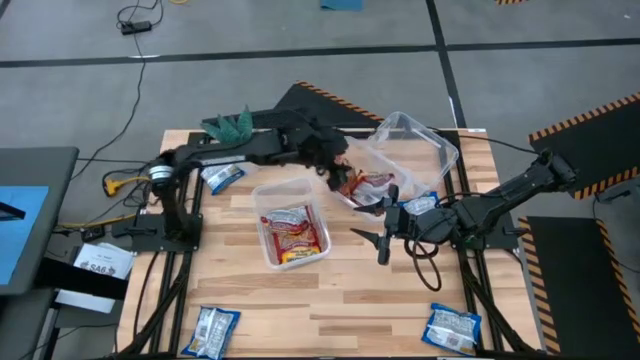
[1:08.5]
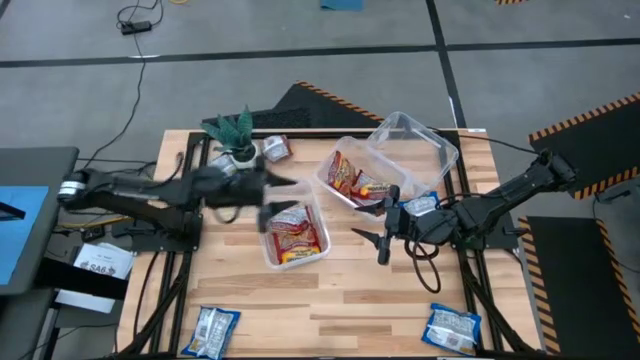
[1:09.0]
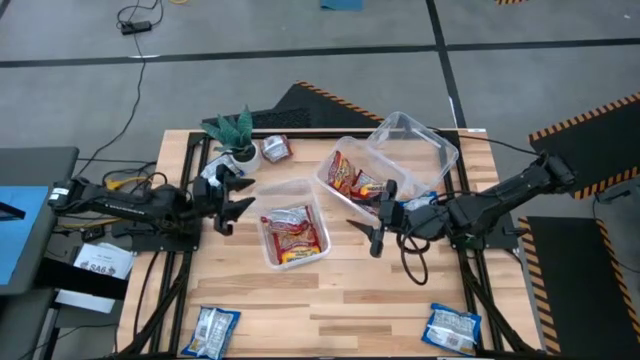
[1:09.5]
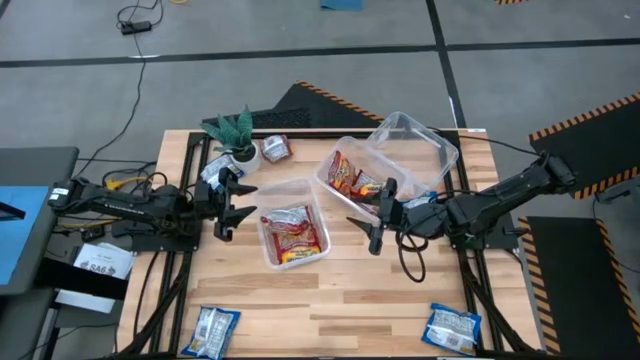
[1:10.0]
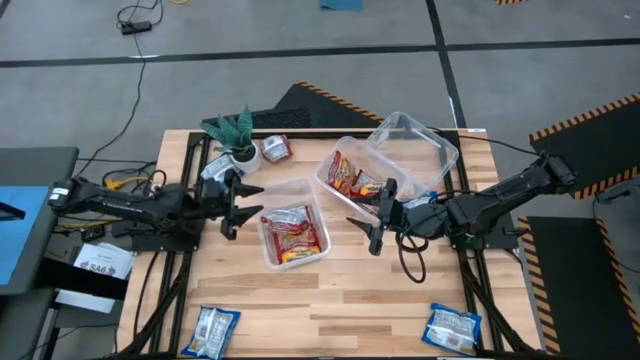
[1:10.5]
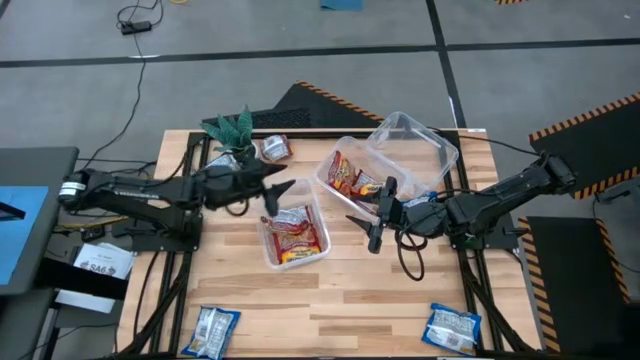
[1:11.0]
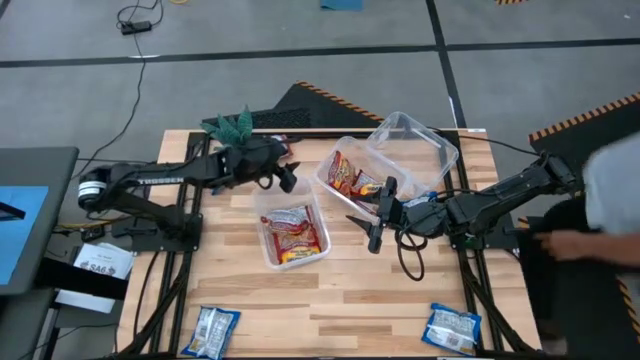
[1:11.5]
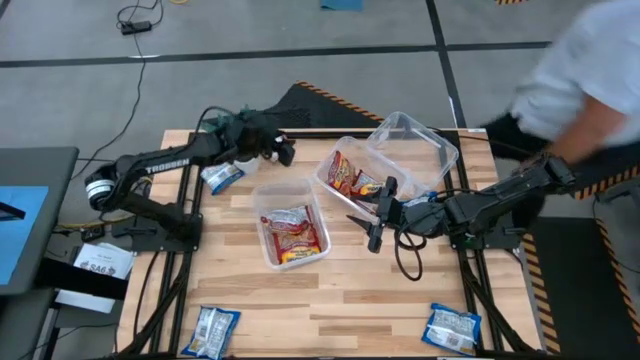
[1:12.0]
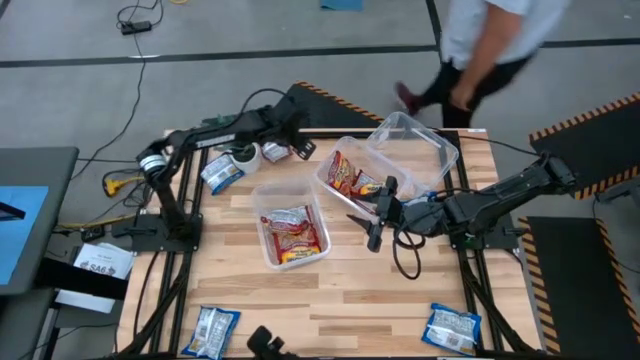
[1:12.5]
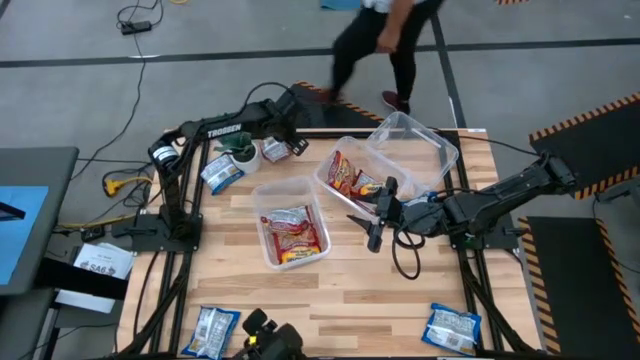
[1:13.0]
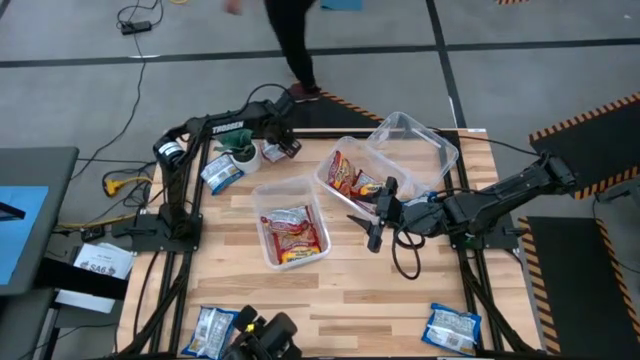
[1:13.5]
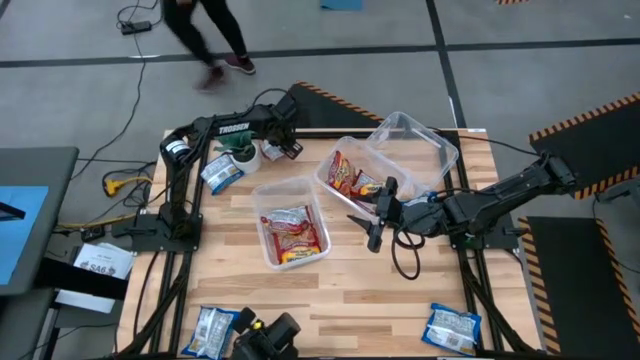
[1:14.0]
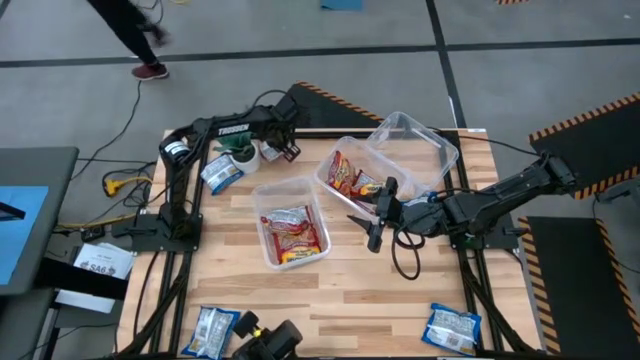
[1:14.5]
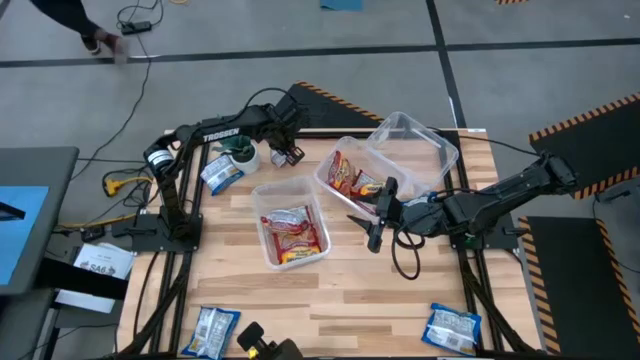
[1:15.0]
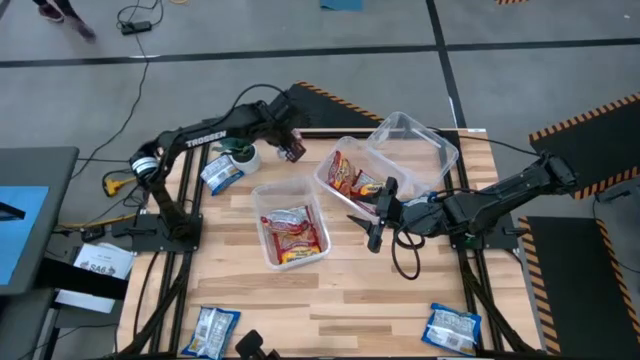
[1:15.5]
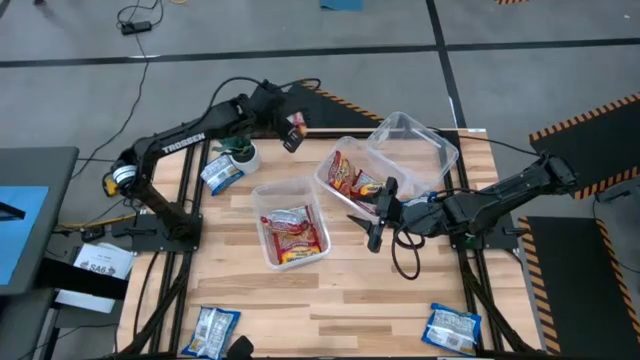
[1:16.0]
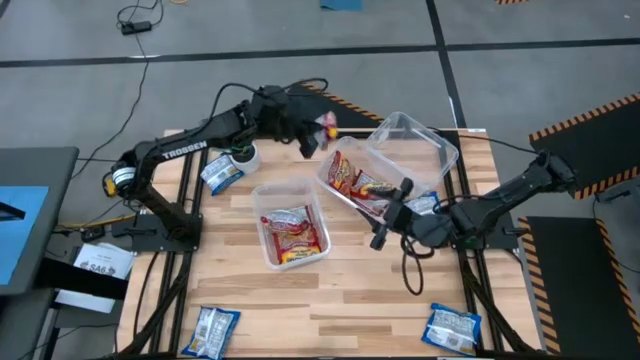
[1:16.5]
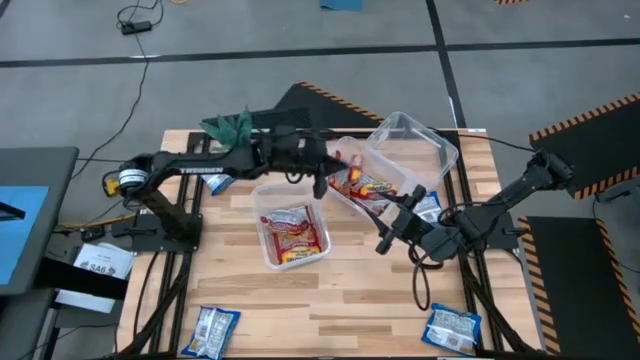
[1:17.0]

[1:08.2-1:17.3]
Task: Sort Maruchan noodles
Put the red noodle pack into the middle bin

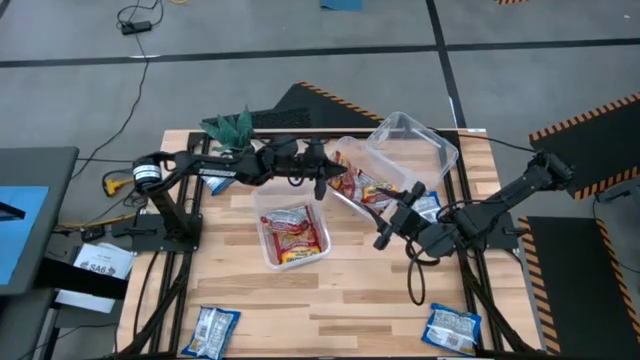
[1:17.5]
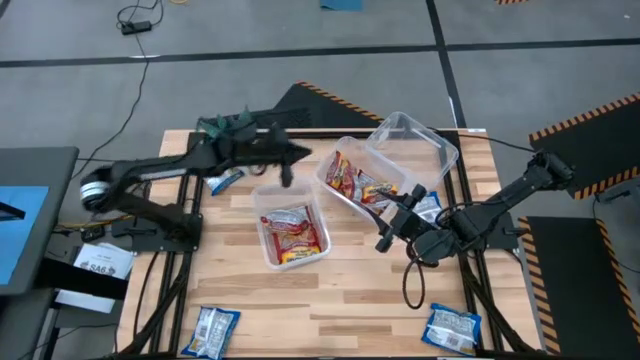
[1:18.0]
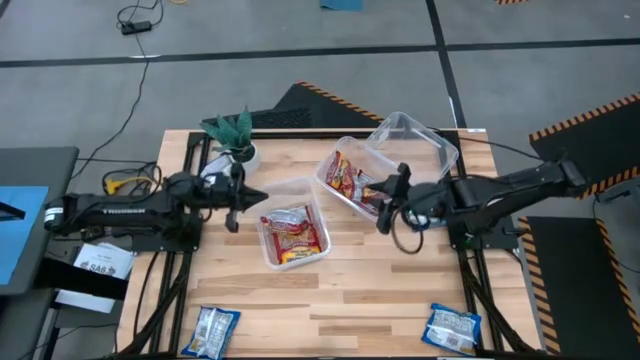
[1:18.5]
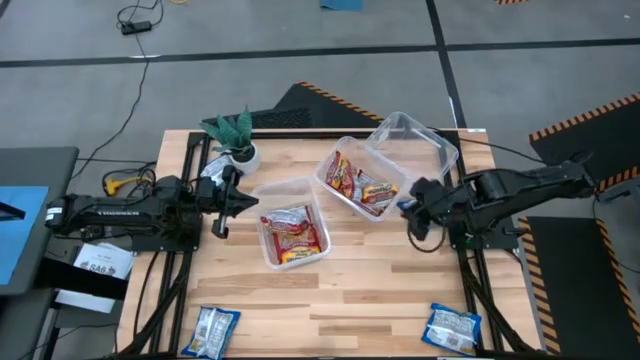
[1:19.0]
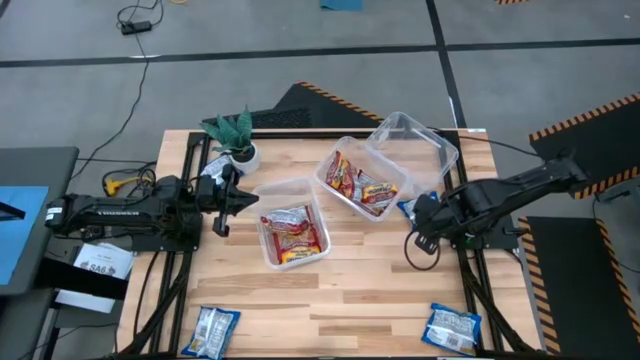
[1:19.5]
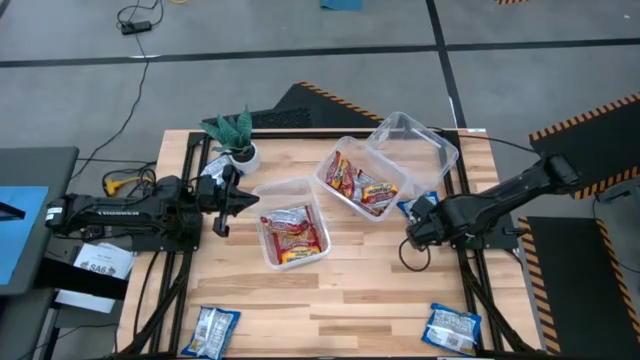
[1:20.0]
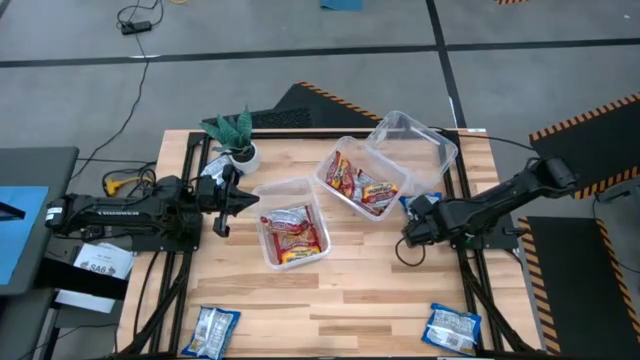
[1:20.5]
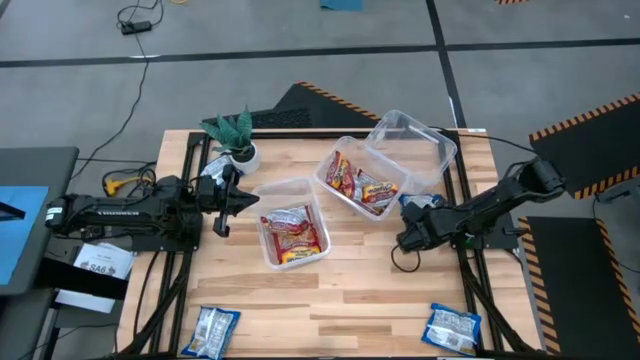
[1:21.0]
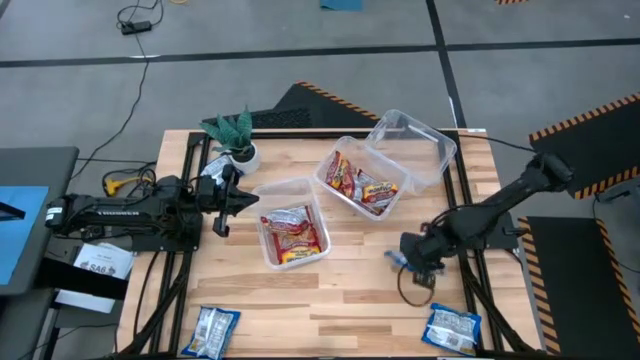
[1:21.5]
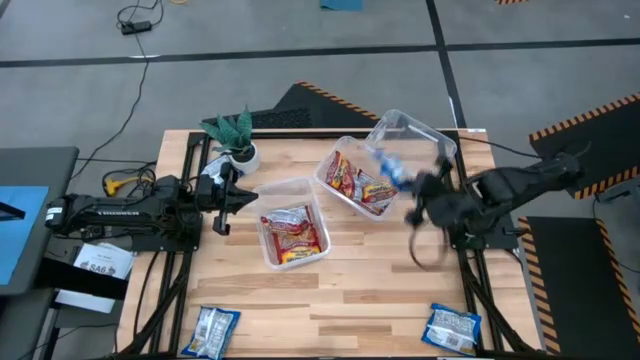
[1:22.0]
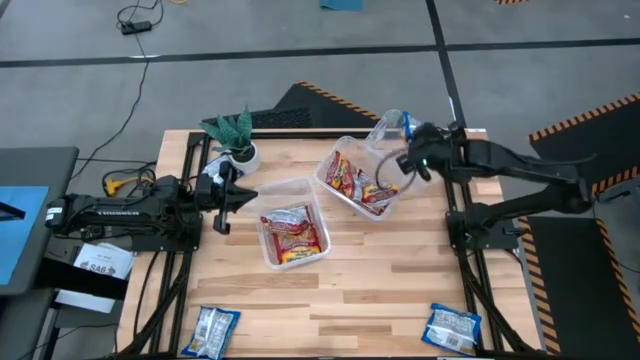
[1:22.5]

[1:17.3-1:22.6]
Put the blue noodle pack into the top bin

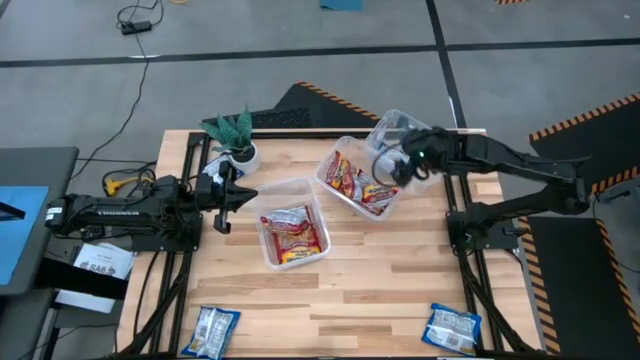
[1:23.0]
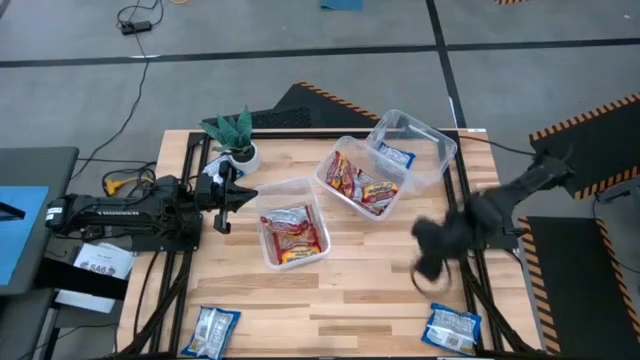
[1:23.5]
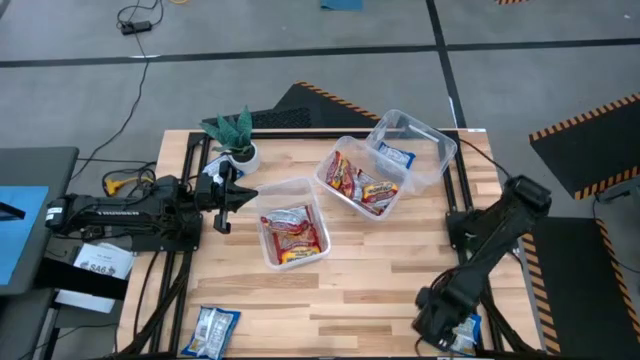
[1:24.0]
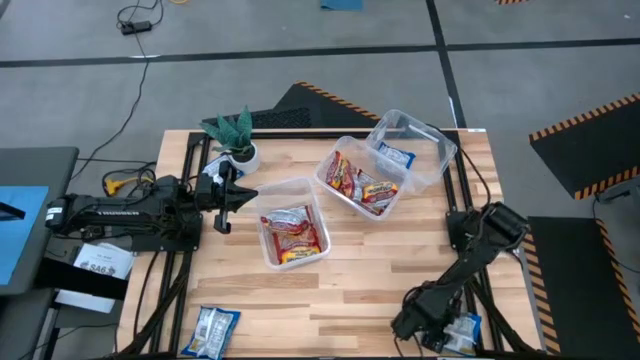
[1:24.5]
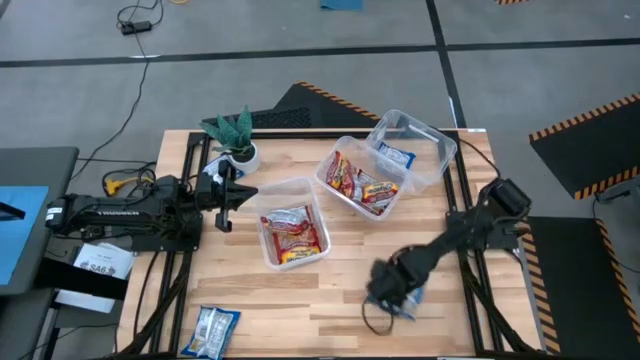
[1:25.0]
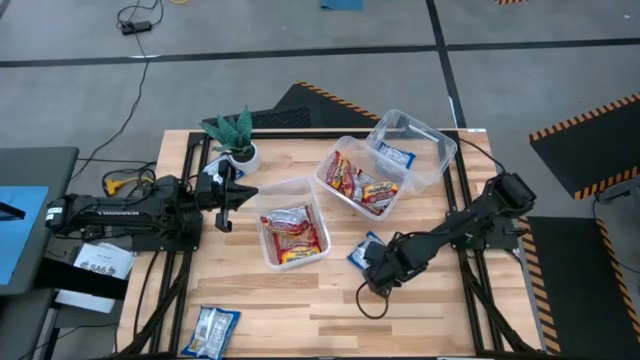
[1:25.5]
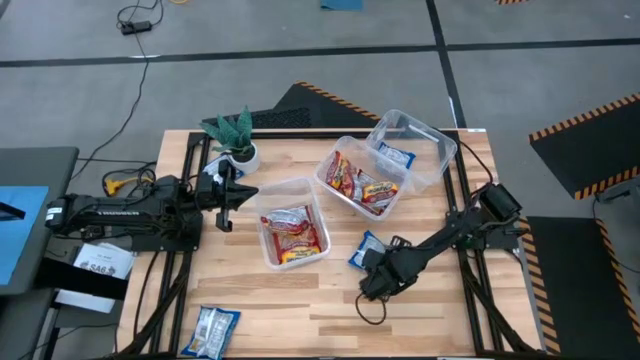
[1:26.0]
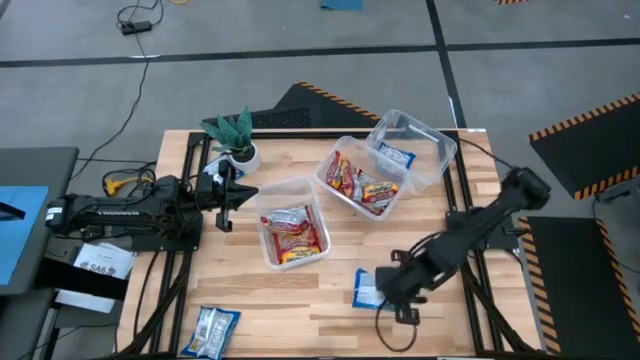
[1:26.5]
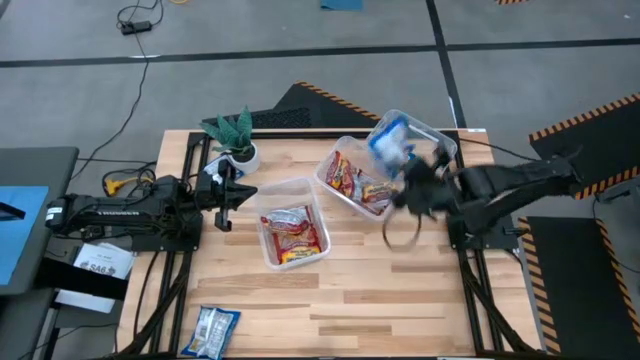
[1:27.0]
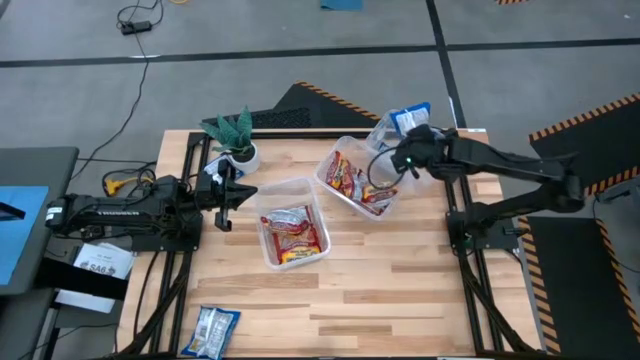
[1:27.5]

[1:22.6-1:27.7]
Put the blue noodle pack into the top bin

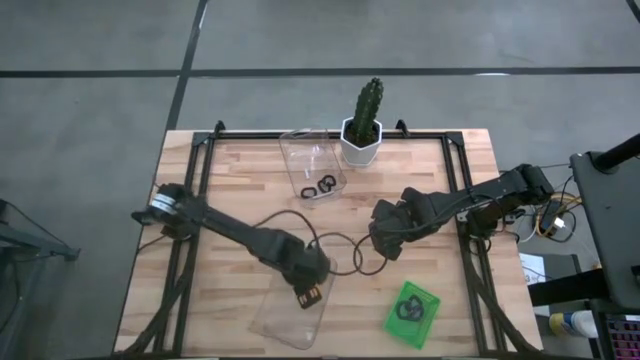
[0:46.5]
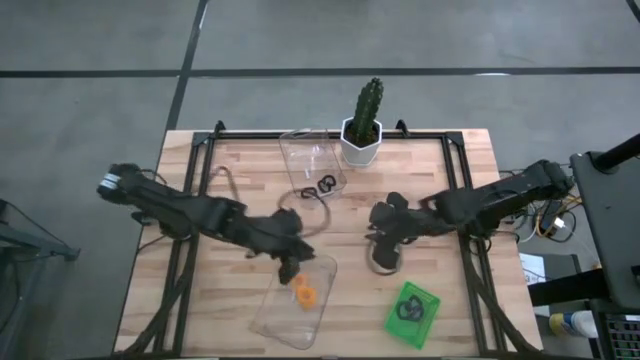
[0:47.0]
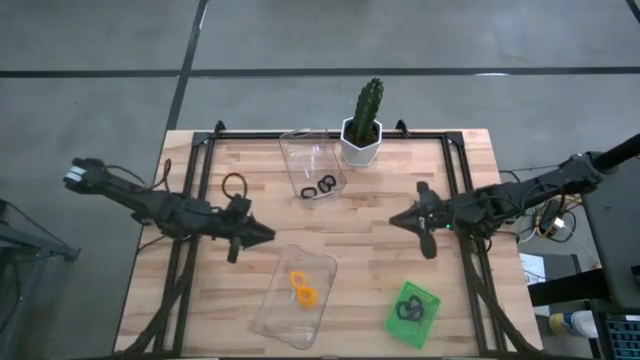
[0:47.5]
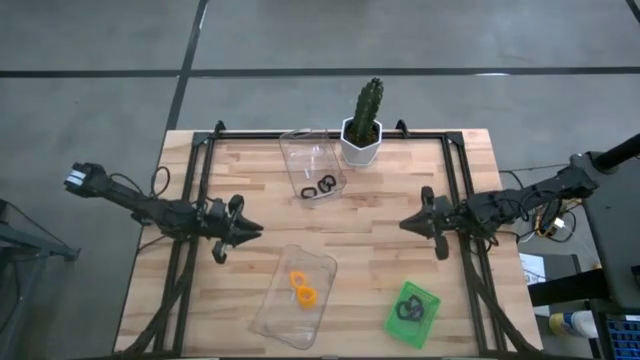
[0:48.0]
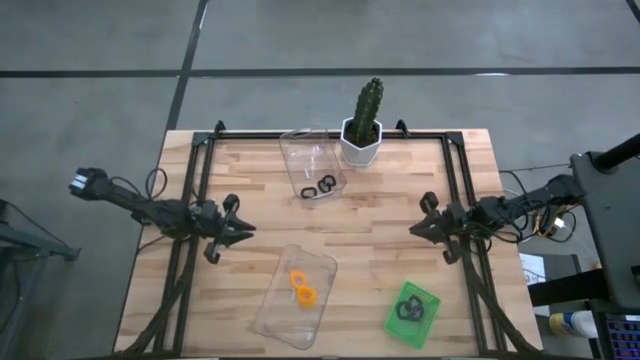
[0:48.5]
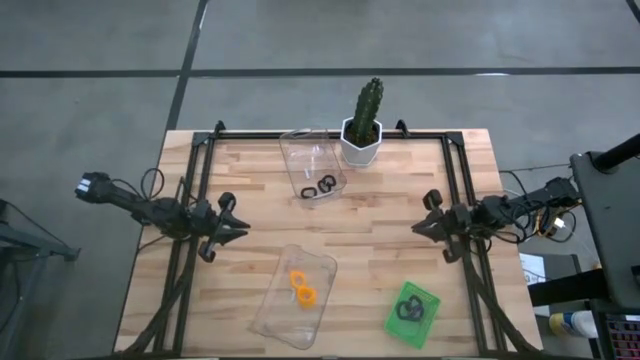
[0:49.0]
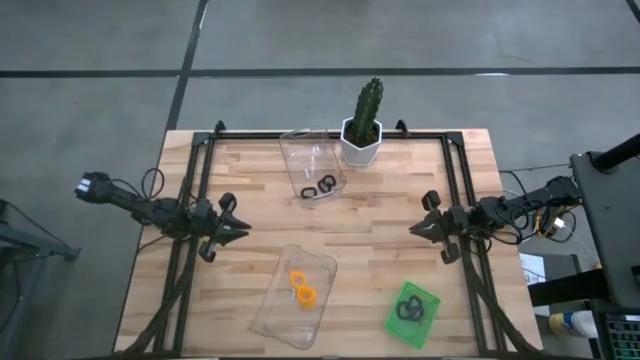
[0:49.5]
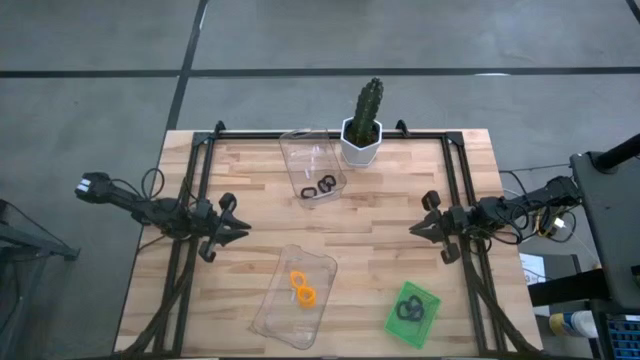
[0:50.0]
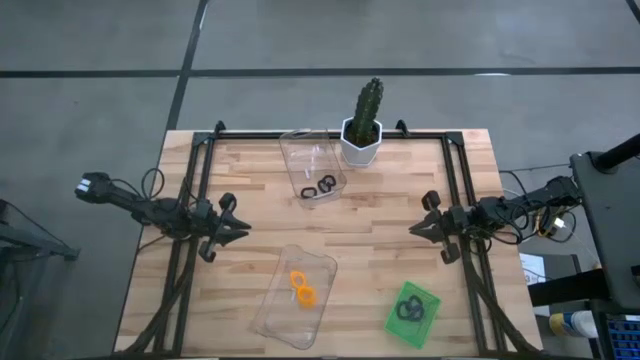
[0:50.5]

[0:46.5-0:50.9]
Task: Sort spring keychains
Return to Home Position
